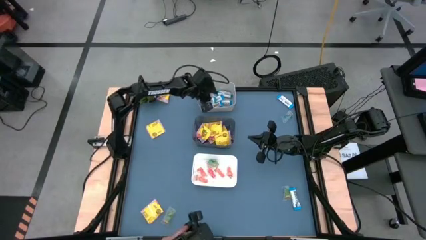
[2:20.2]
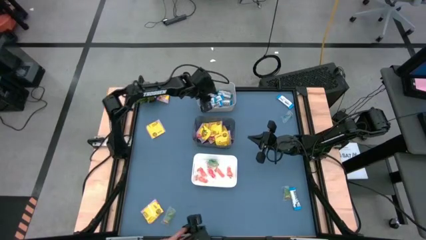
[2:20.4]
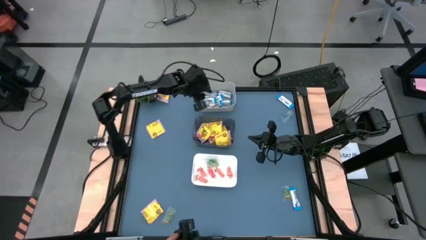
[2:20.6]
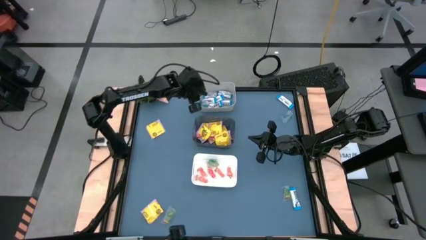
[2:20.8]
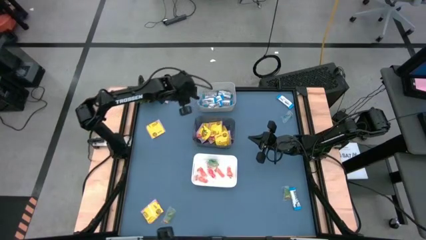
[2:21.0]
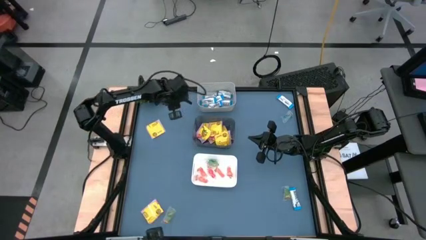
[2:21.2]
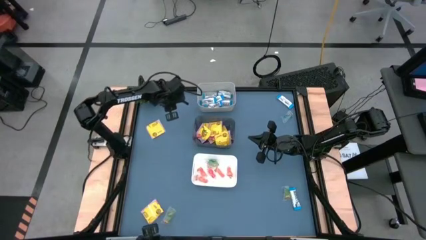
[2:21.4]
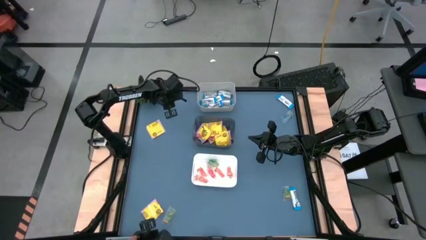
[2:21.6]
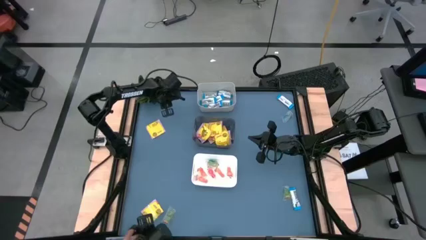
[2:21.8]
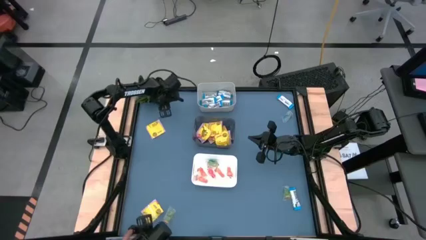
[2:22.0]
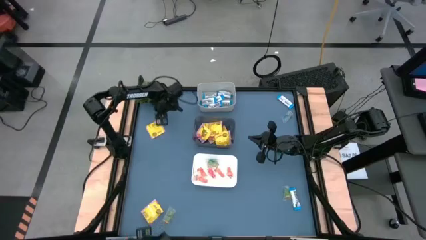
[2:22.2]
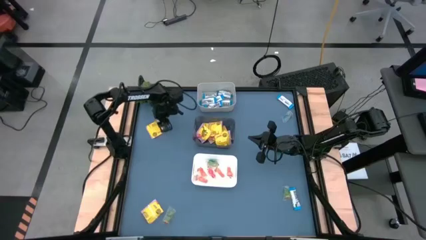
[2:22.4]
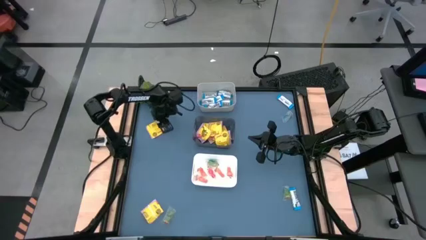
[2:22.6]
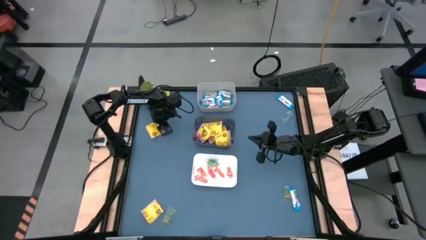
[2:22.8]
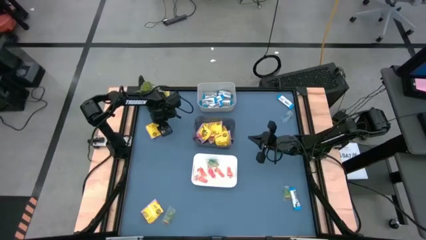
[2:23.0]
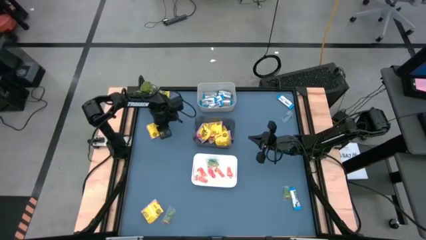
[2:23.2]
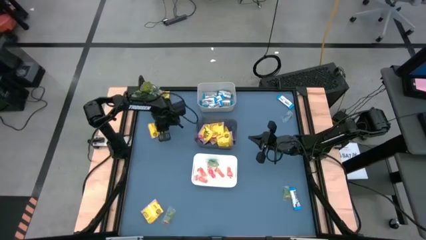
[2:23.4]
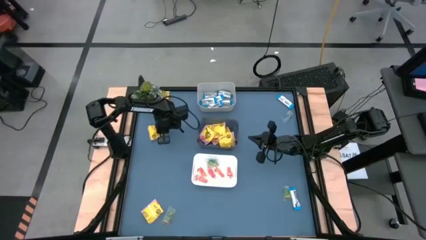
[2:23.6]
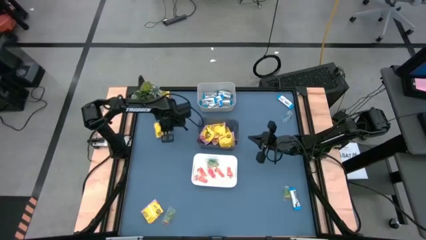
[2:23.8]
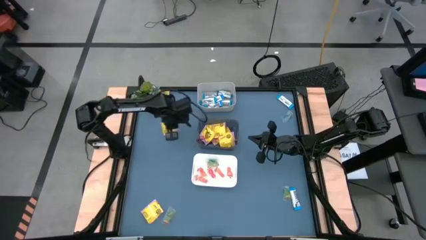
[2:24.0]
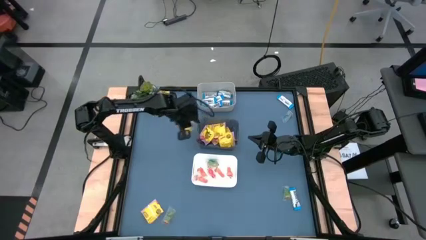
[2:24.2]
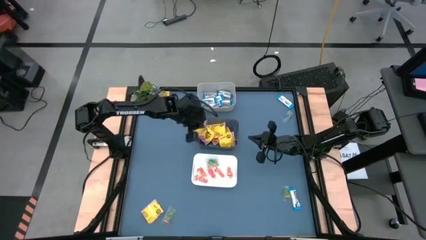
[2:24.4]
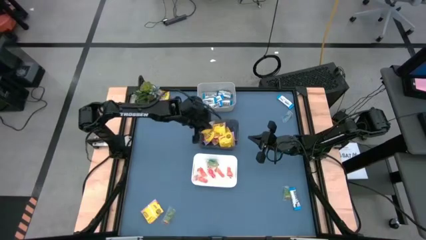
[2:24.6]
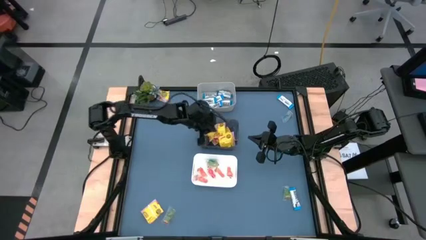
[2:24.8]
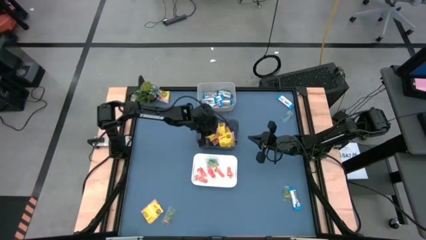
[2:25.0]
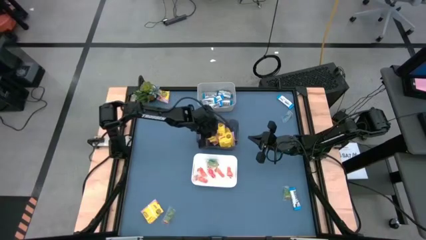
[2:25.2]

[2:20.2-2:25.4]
Task: Sort candy
Put the yellow candy into the black bin

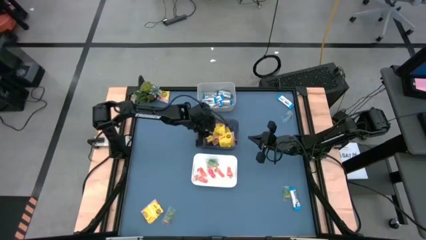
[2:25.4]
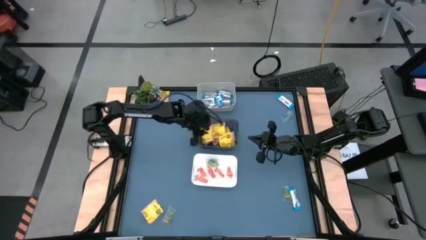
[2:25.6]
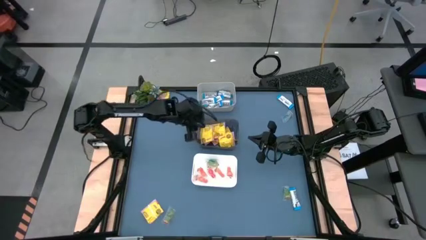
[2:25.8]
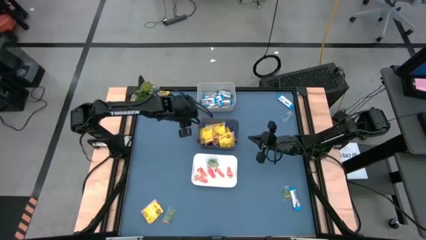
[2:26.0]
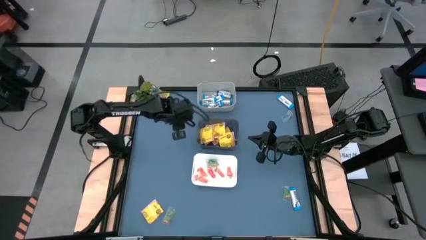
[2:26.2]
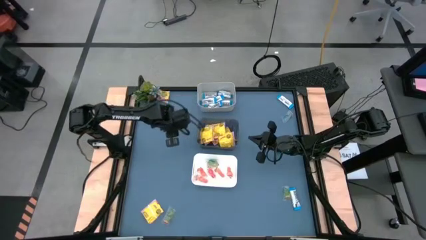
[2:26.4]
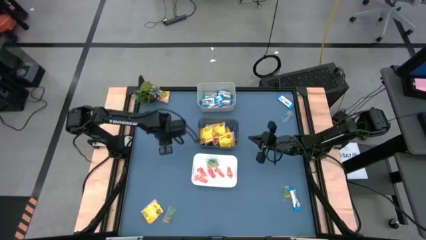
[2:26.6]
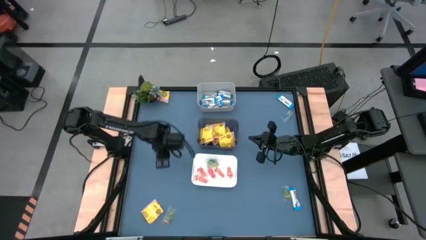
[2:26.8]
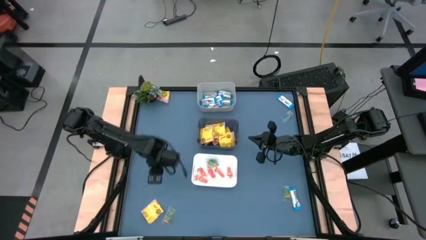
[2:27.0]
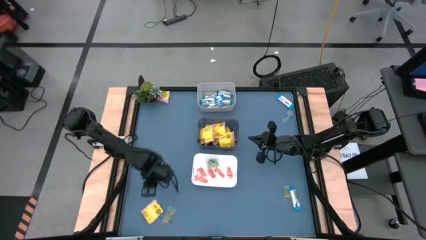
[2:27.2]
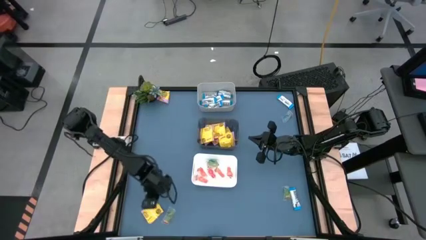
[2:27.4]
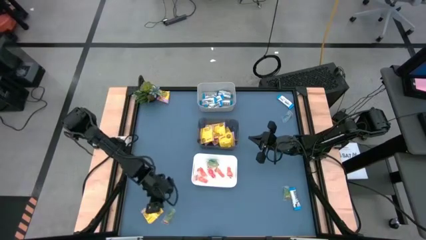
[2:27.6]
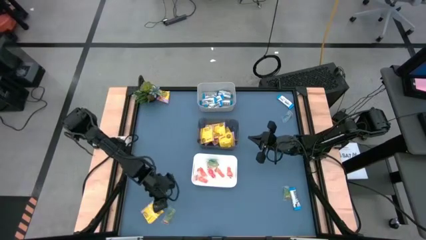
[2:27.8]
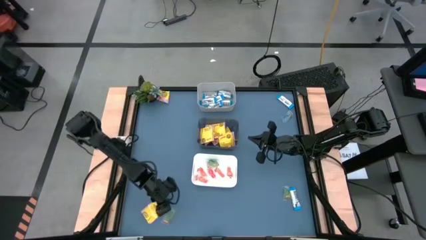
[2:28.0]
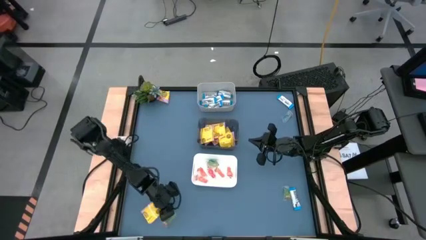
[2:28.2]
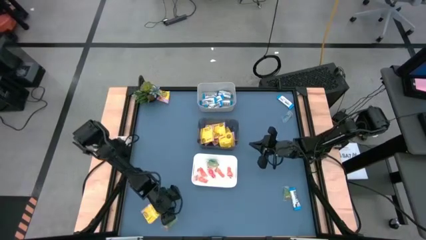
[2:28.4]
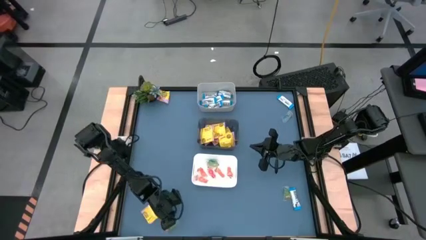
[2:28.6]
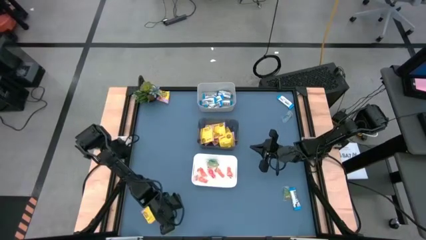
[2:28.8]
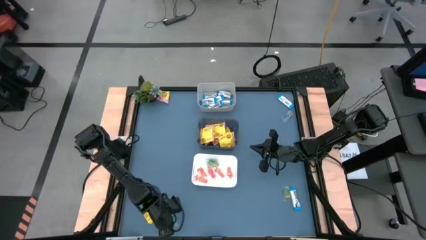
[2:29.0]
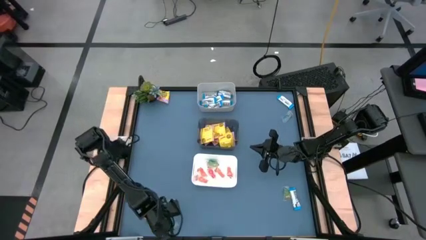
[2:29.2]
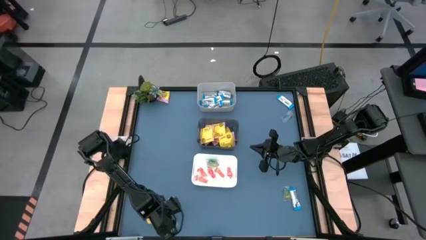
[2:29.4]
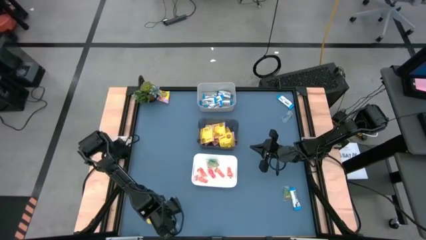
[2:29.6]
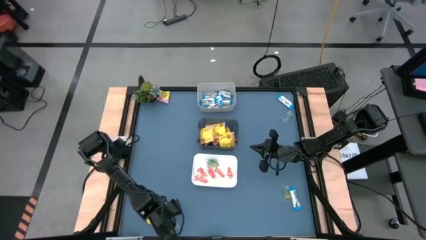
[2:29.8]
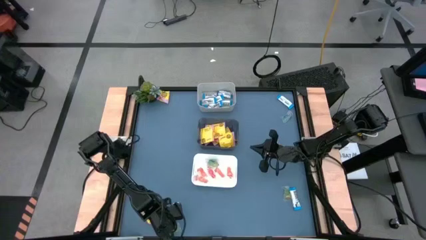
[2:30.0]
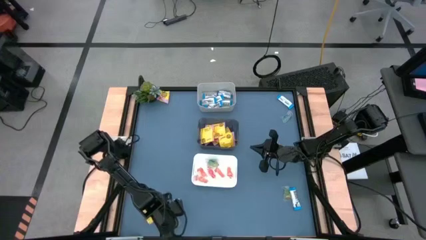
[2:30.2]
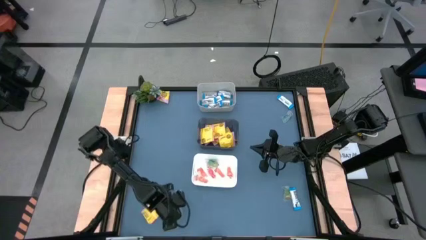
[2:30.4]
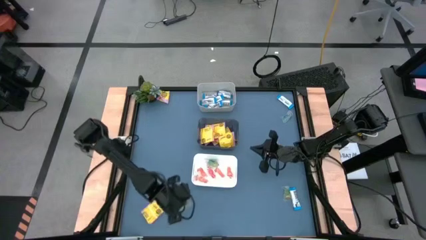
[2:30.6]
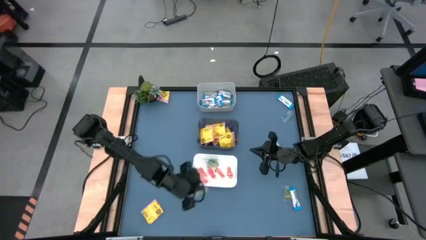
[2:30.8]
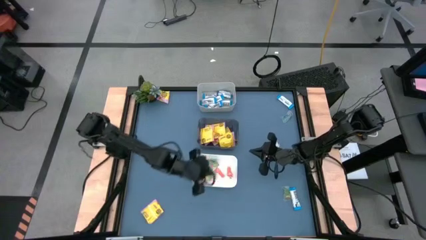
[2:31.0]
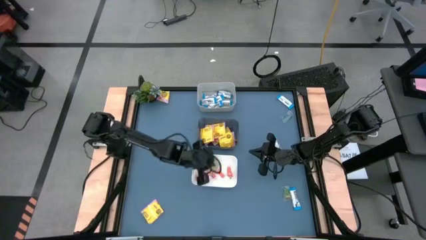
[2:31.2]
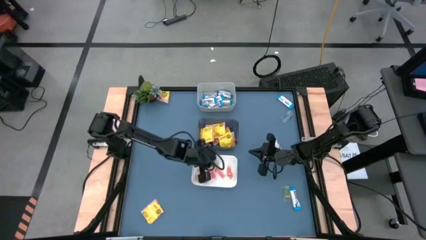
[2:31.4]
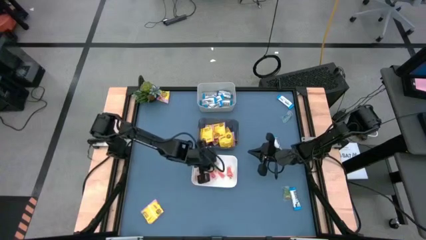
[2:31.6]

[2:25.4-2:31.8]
Put the green gummy candy into the white bin

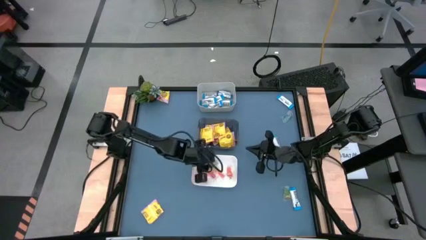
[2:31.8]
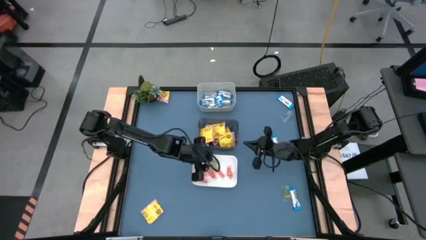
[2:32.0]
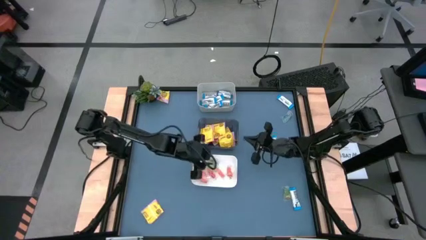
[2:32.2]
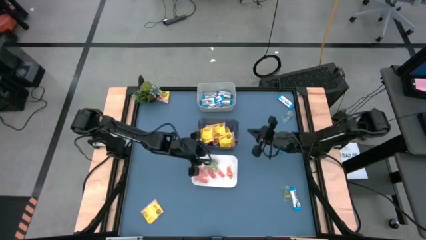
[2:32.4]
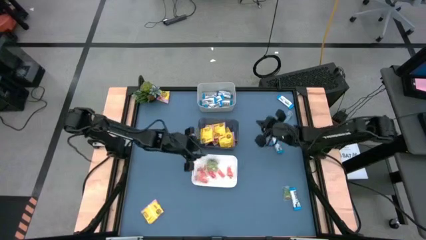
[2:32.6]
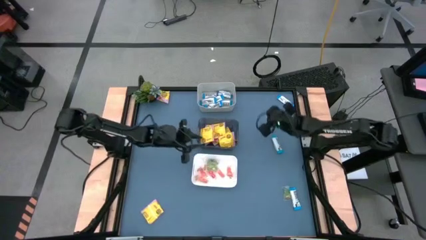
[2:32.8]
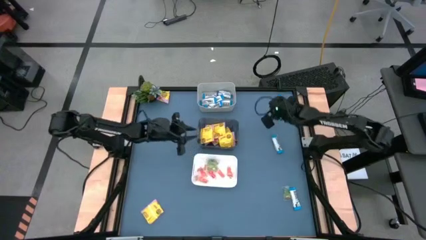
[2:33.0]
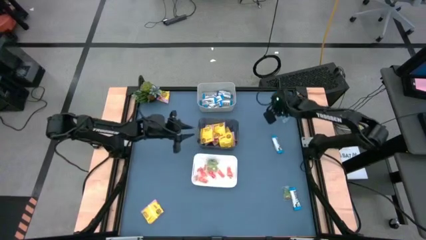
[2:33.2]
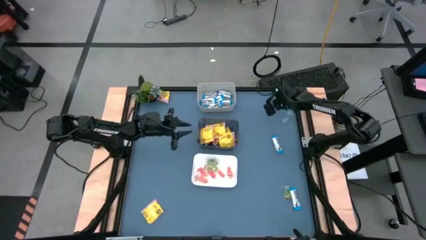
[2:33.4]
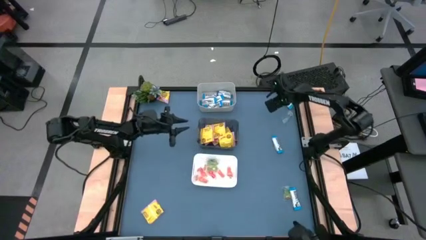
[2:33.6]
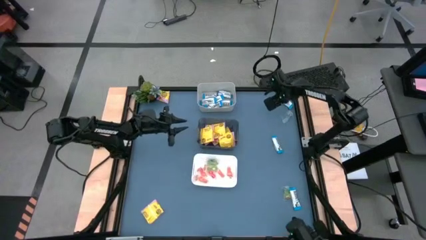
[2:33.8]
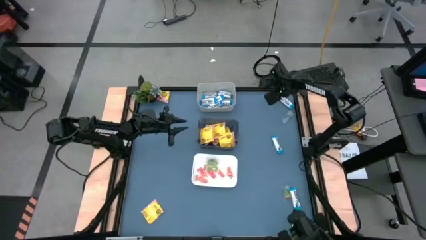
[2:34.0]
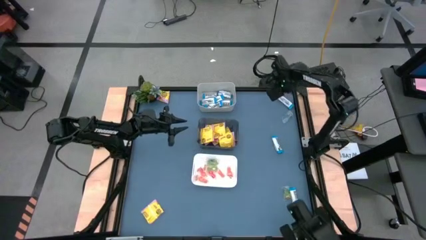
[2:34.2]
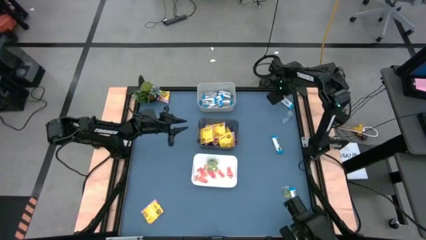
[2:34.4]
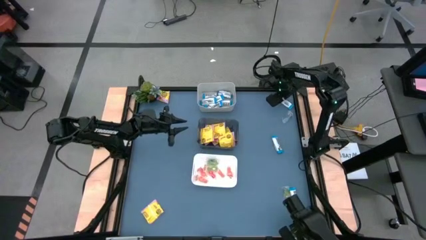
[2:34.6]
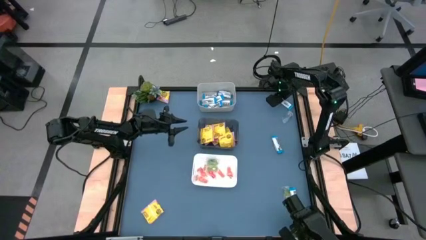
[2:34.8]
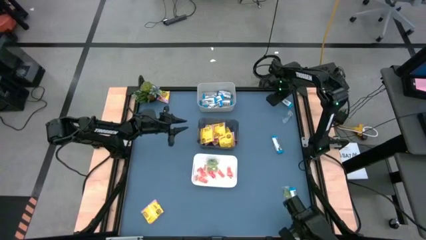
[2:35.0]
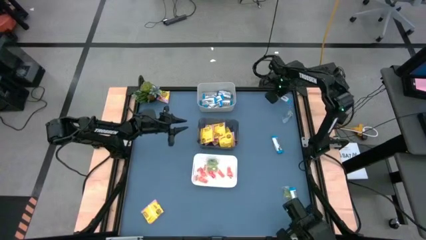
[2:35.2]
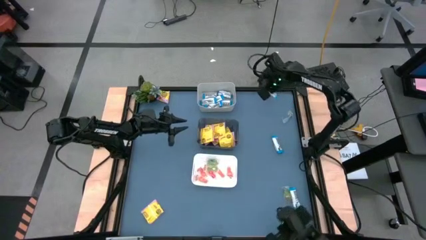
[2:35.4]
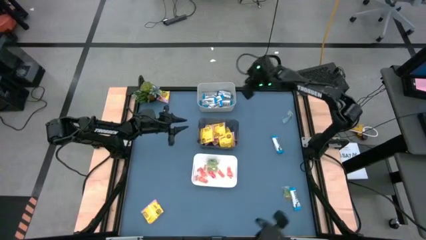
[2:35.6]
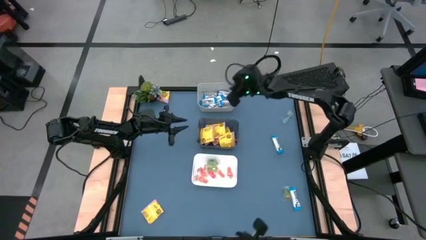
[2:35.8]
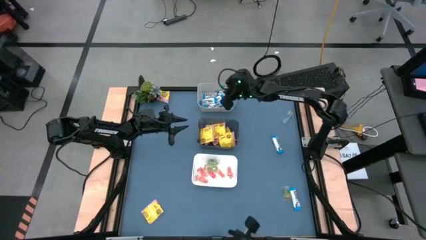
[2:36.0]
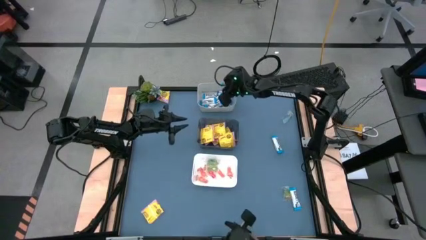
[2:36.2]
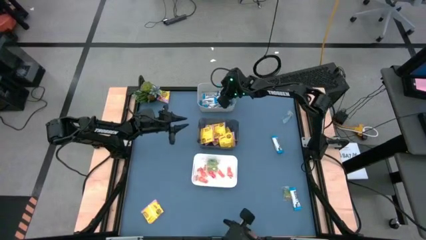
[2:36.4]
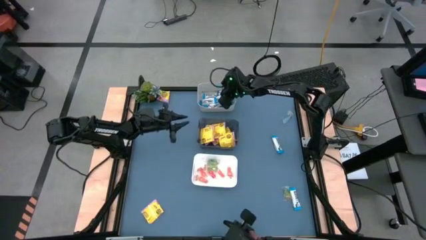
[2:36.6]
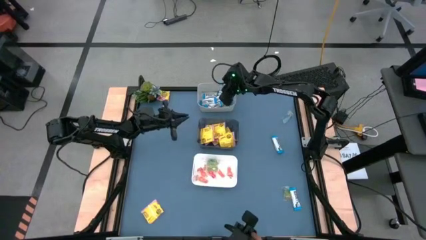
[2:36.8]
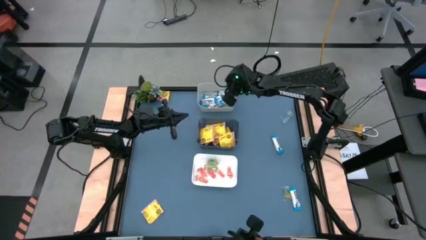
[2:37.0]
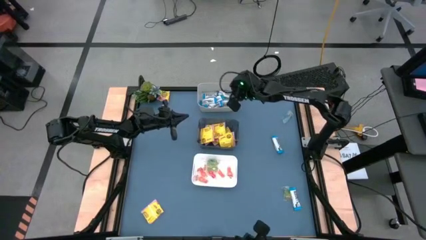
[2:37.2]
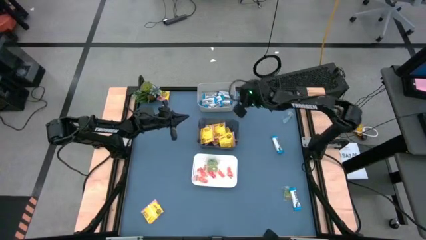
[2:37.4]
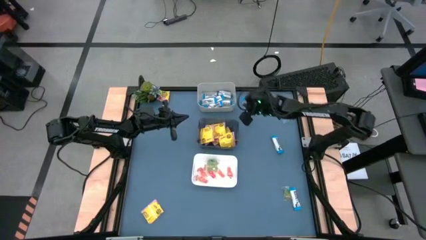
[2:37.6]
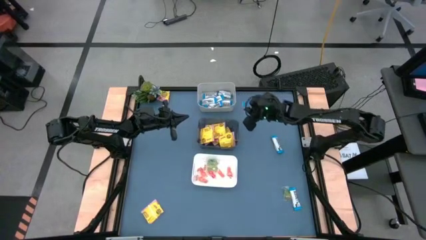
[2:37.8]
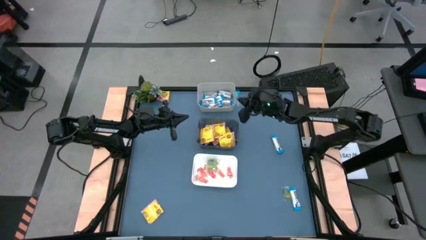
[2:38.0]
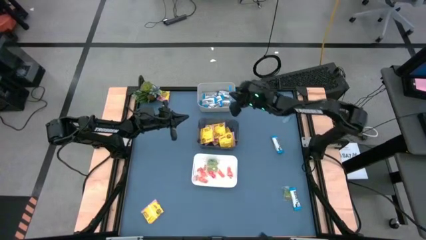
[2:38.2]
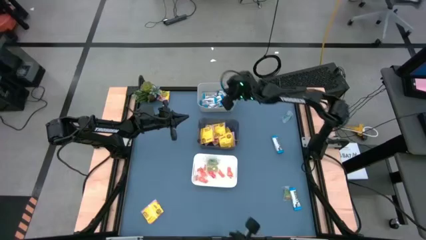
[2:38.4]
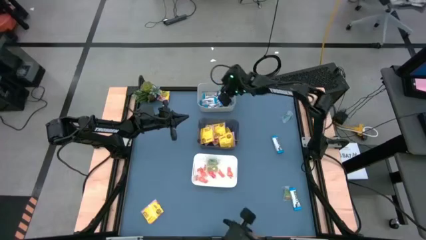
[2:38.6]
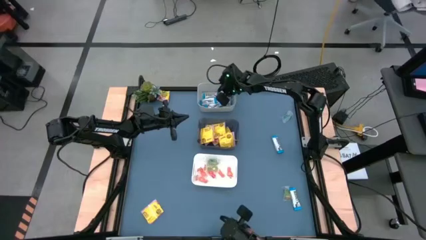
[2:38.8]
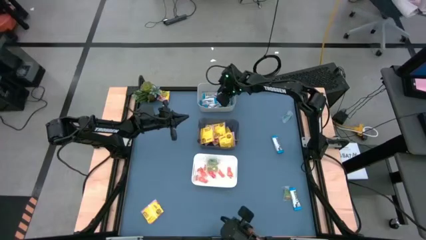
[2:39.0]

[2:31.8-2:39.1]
Put the white chocolate bar into the gray bin
